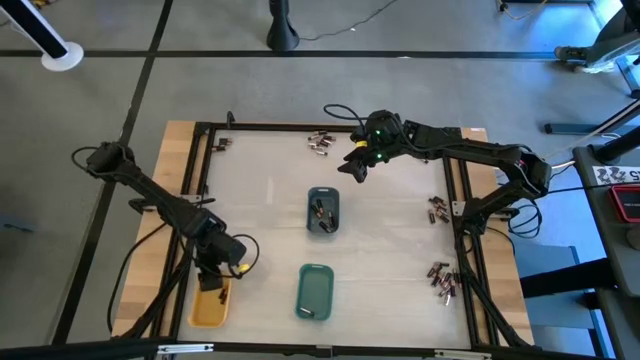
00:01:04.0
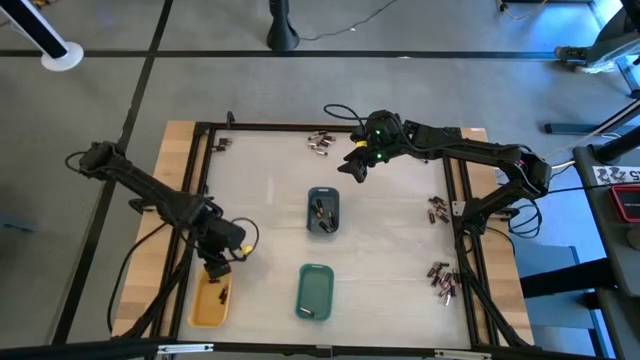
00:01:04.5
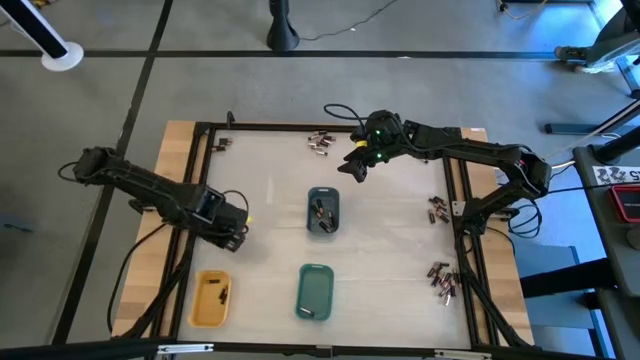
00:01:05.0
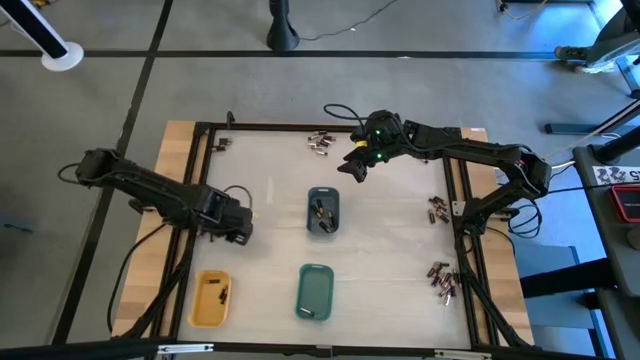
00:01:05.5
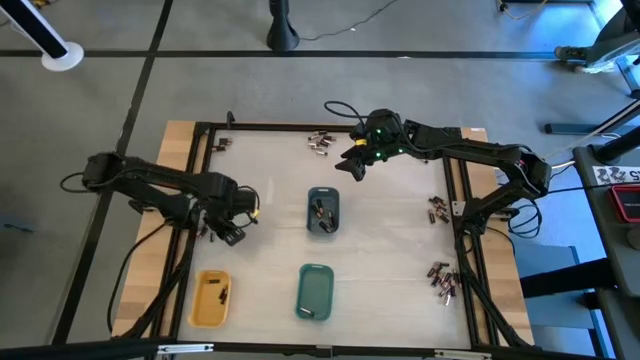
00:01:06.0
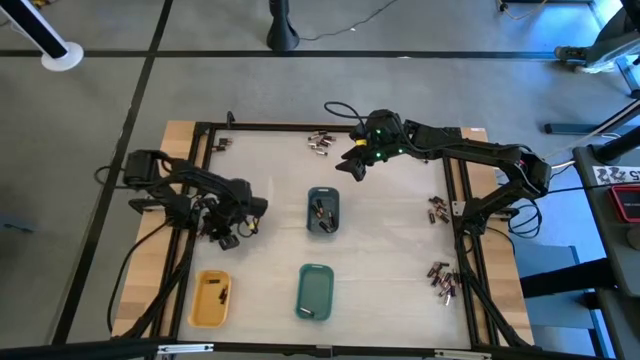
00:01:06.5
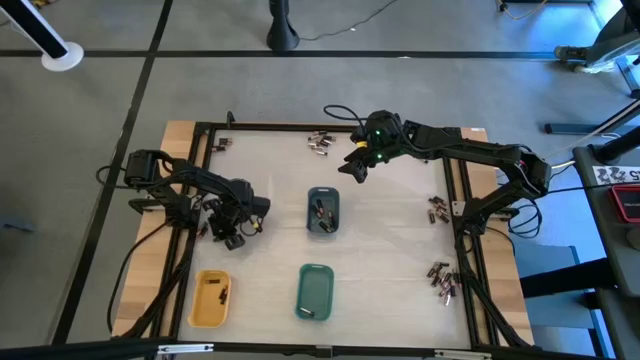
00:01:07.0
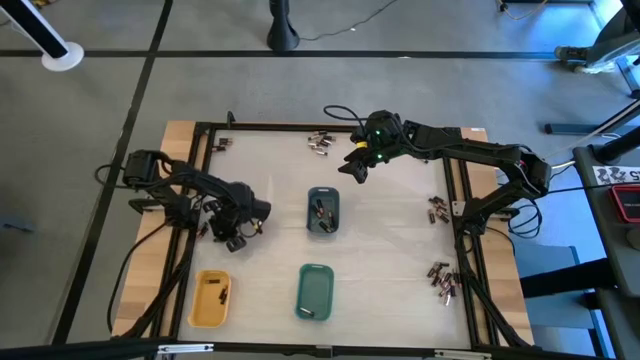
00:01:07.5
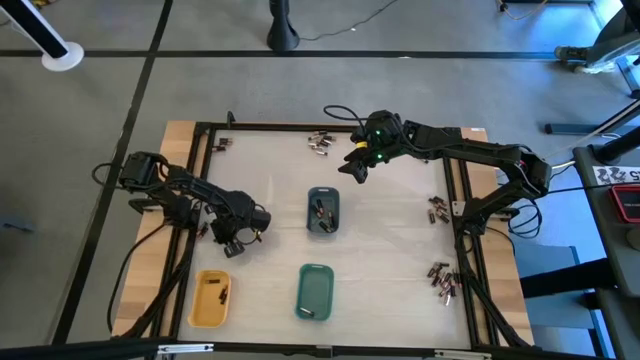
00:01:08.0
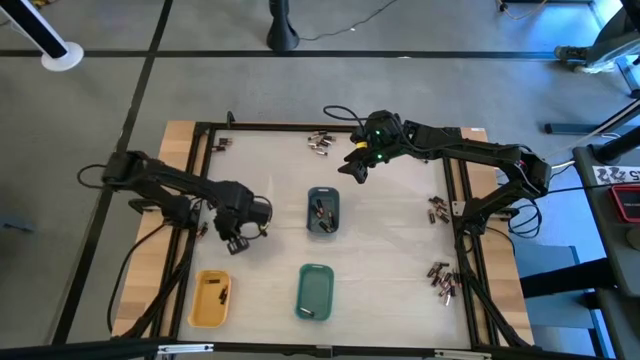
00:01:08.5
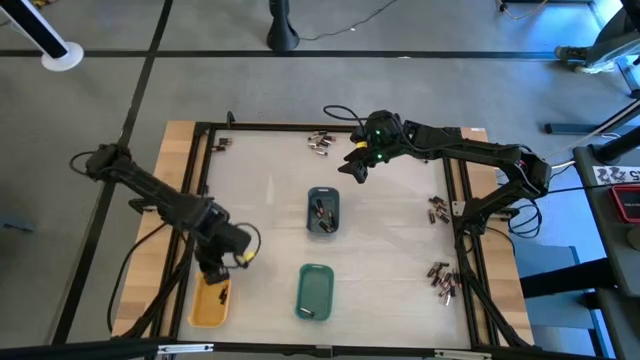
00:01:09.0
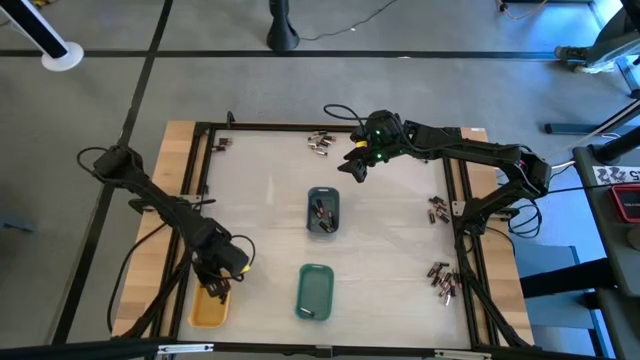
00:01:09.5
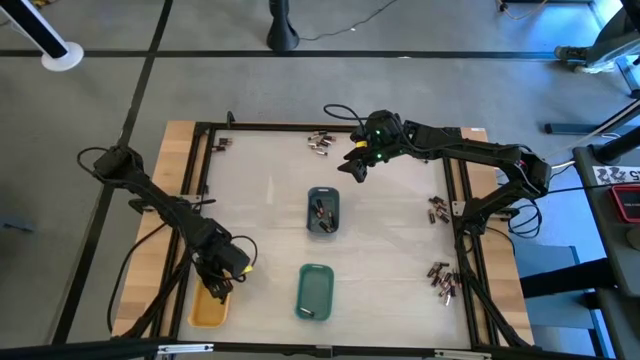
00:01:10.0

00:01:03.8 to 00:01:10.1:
Task: Sort batteries
Put the small black battery into the yellow bin

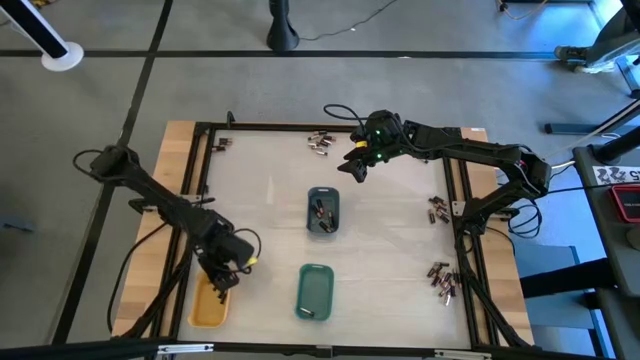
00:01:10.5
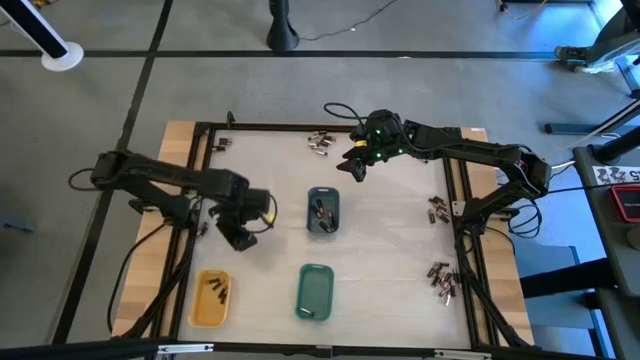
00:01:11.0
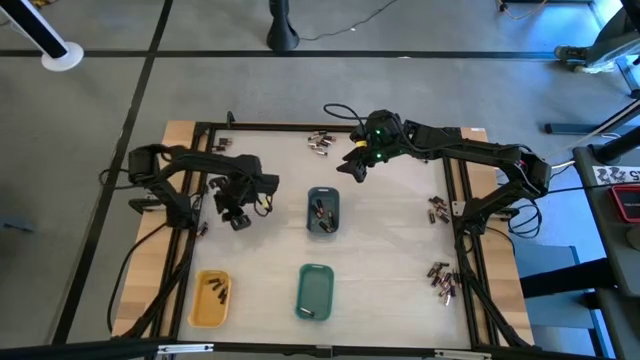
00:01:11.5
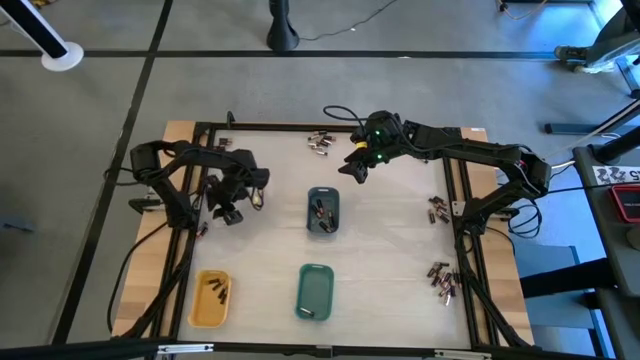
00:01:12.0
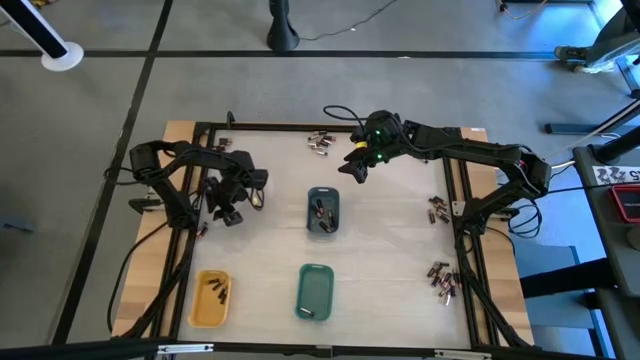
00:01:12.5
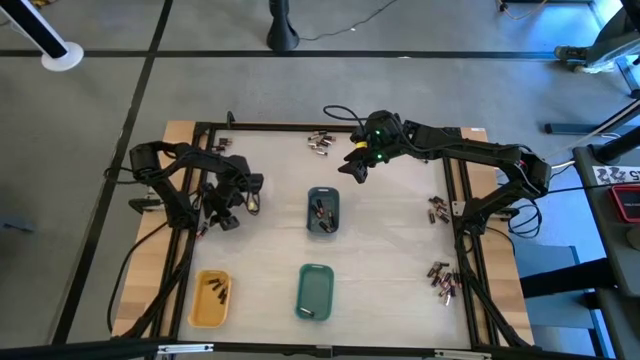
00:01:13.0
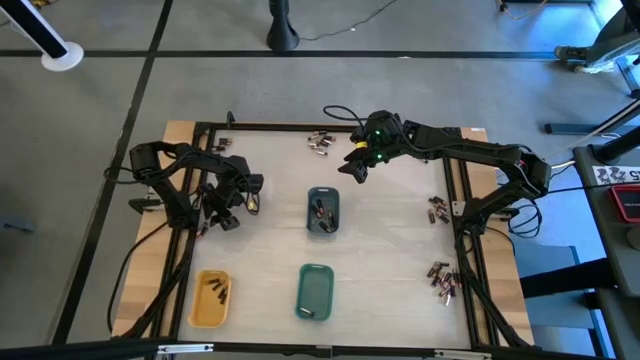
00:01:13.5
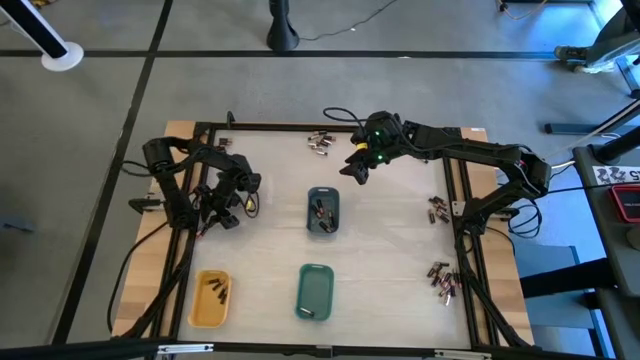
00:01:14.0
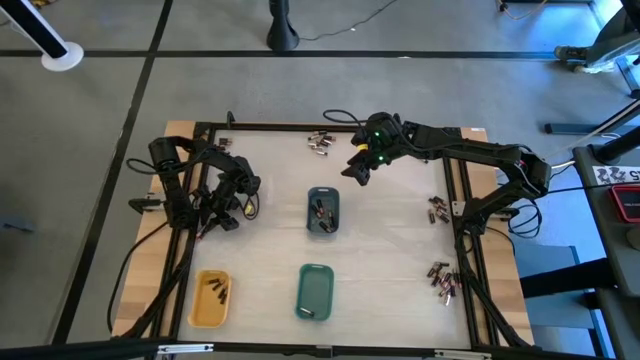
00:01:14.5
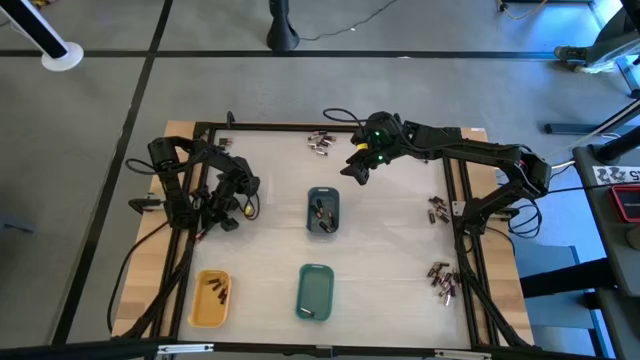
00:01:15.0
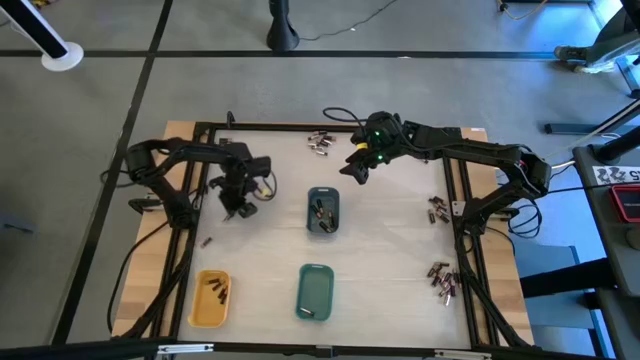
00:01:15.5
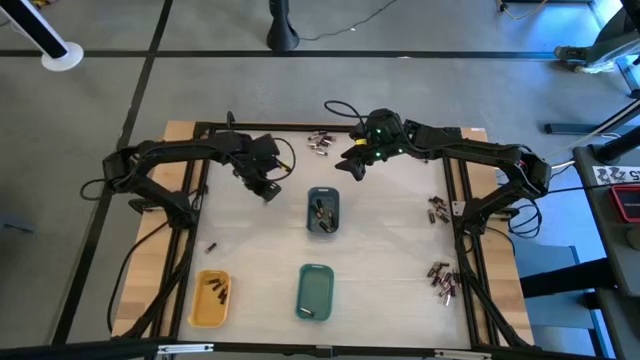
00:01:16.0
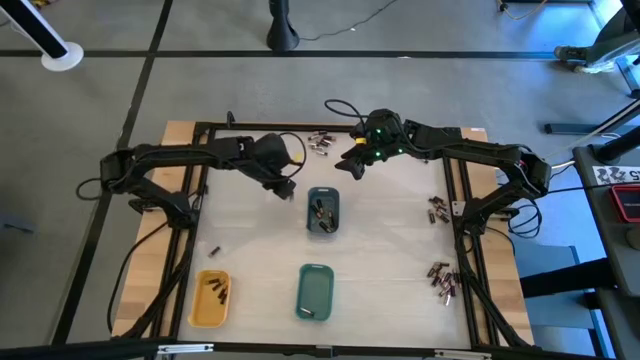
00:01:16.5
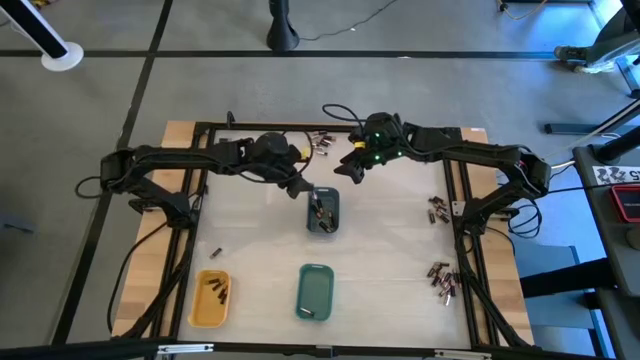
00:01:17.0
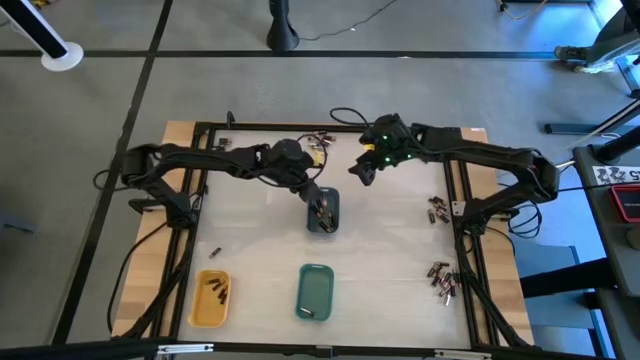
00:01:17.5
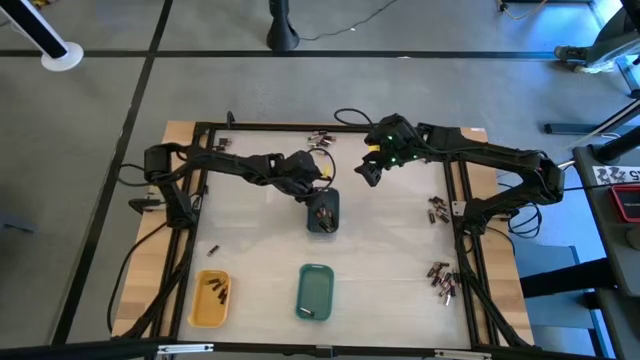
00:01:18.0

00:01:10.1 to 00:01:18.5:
Put the large black battery into the blue bin

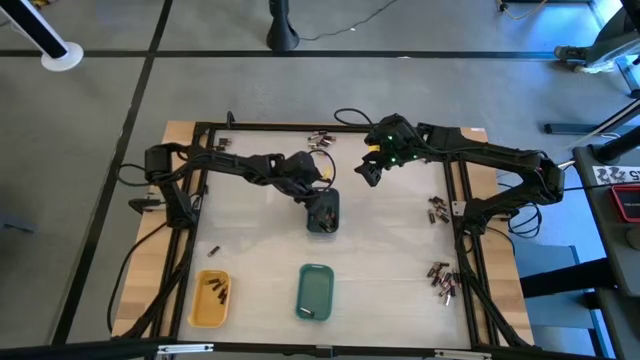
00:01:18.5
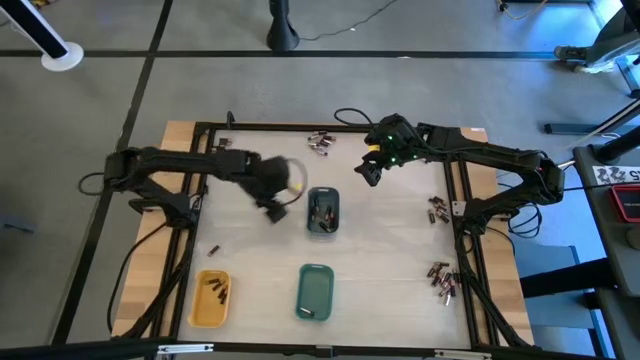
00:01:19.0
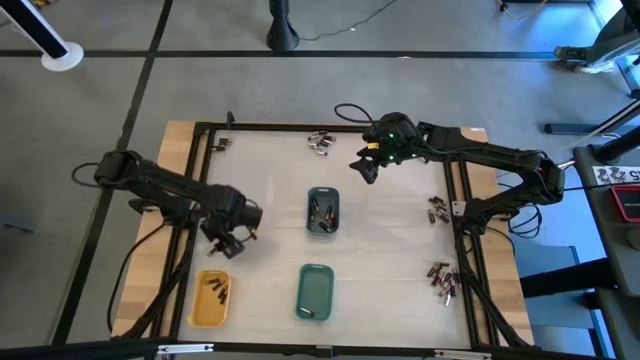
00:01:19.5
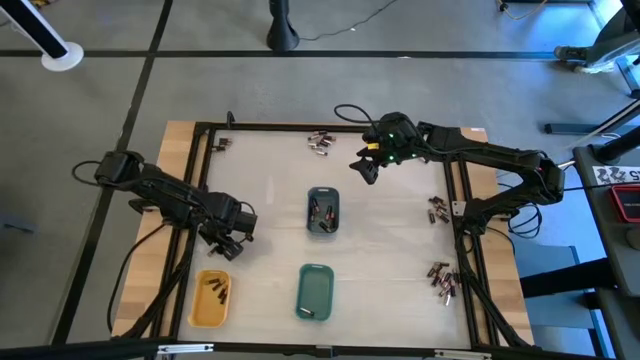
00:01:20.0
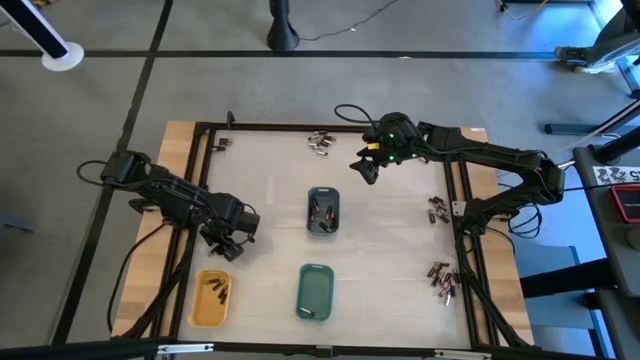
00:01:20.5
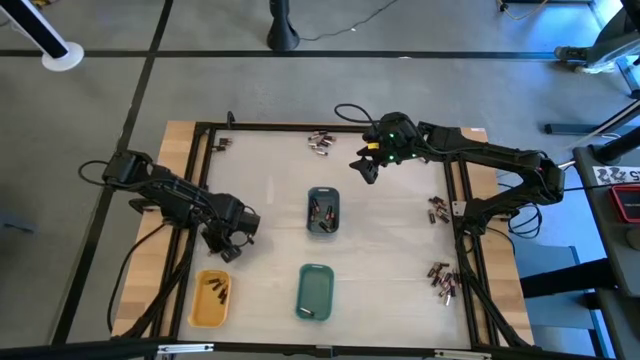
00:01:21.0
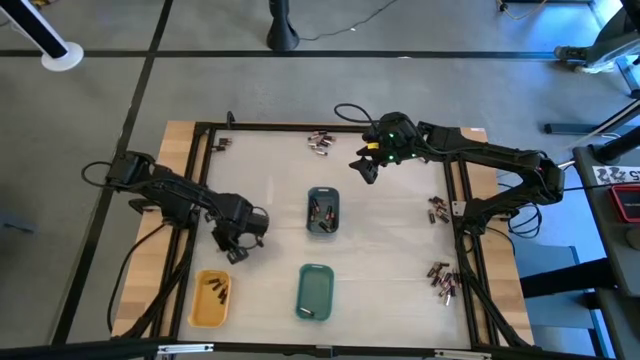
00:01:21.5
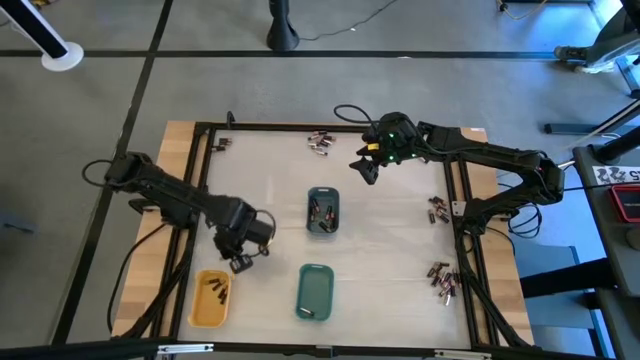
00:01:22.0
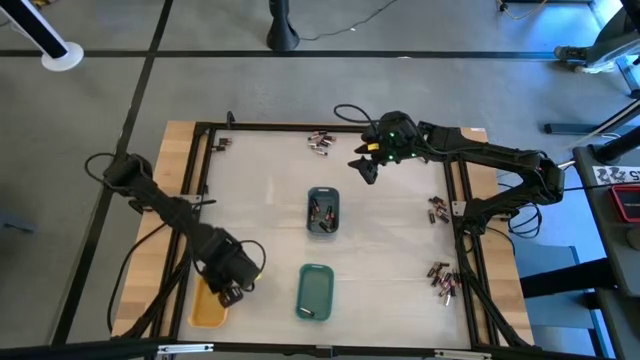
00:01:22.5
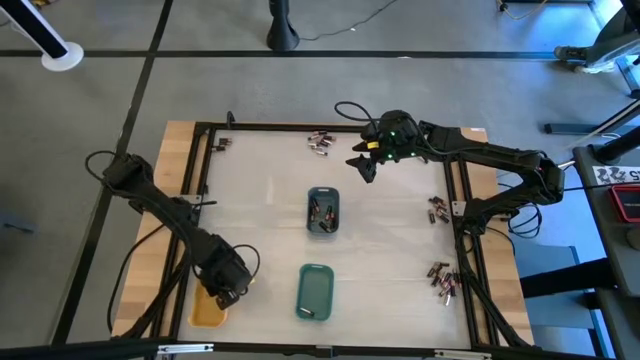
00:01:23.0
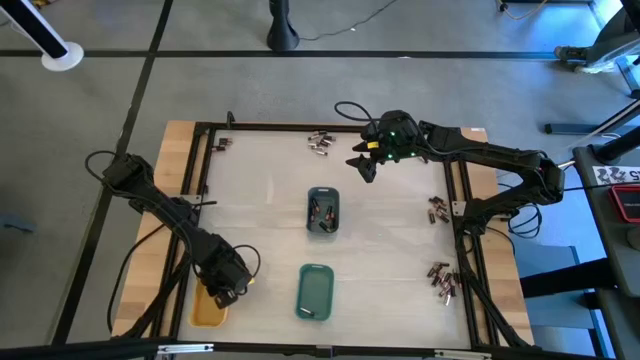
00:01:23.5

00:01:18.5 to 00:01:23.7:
Put the small black battery into the yellow bin

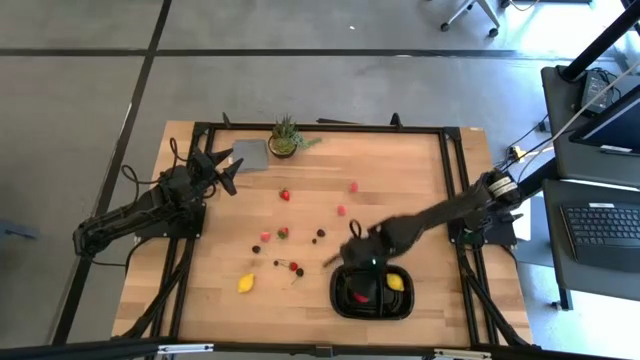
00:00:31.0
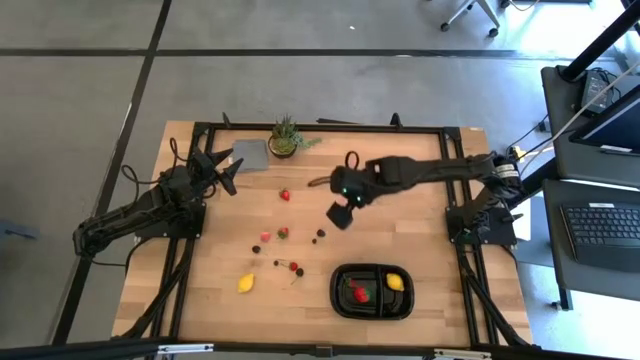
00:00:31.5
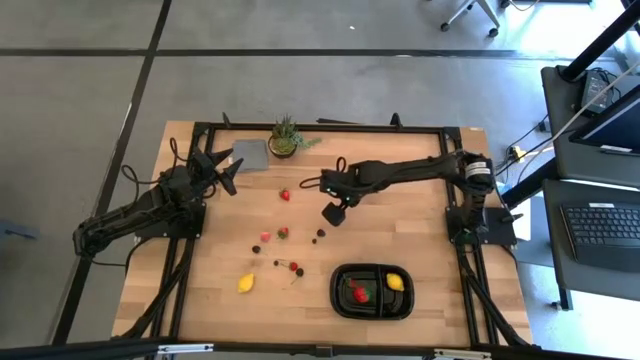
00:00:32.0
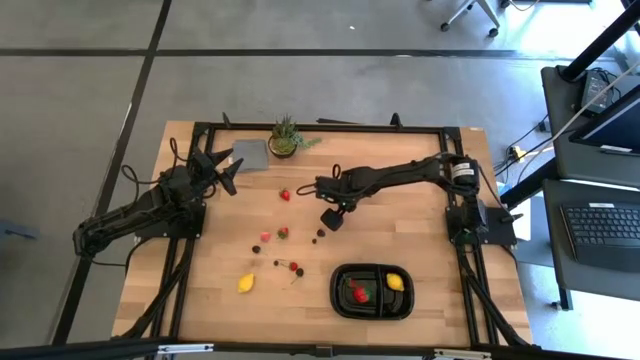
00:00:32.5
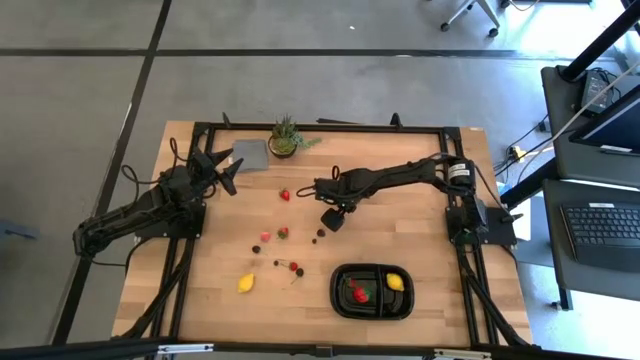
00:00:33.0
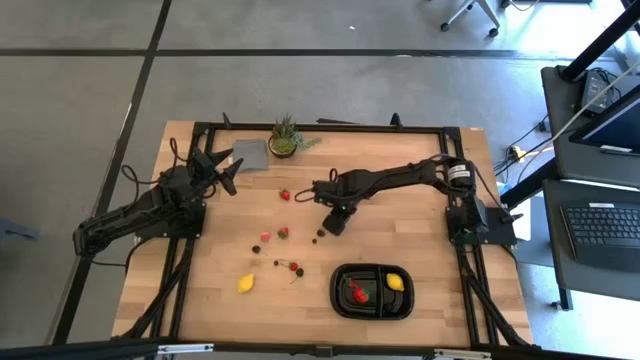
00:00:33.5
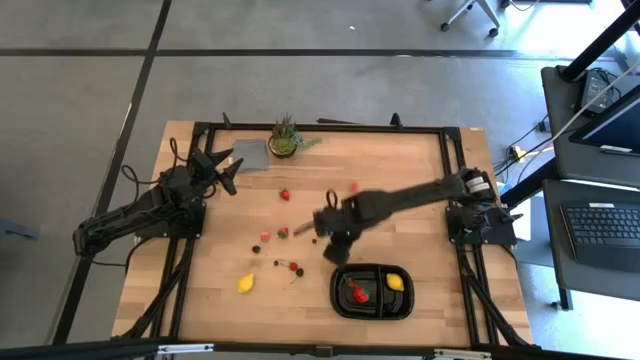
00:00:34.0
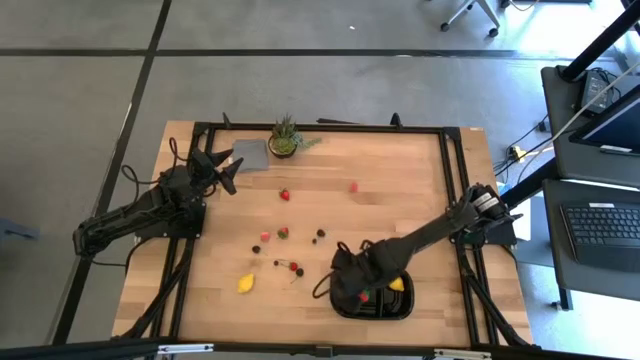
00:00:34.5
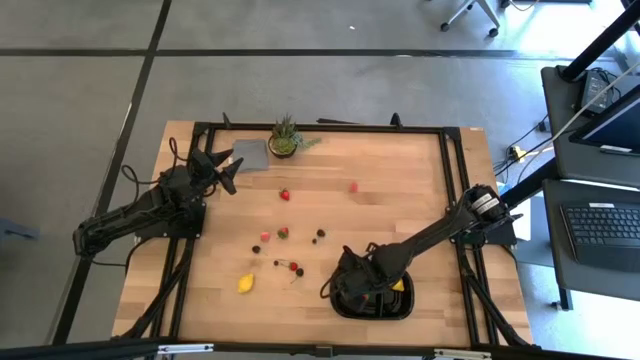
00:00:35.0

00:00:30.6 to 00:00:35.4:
Task: Pick and placing Produce into tupperware
Put the pink peach into the black bin
